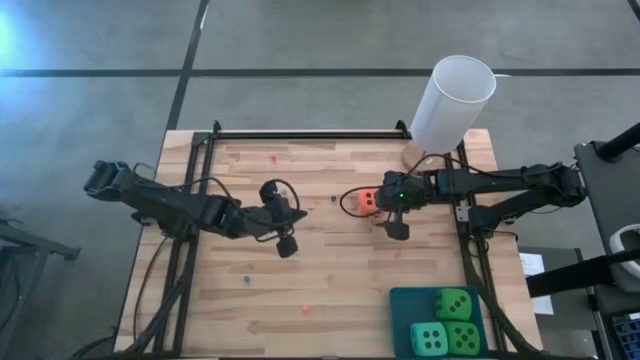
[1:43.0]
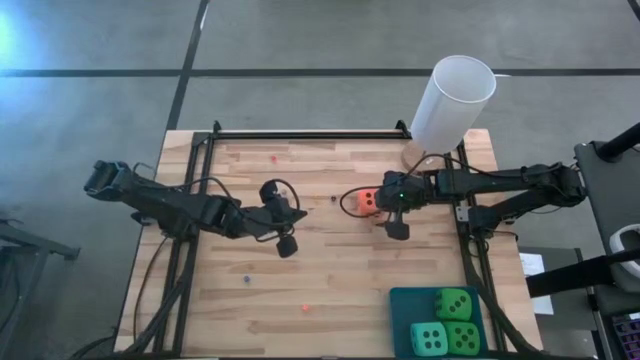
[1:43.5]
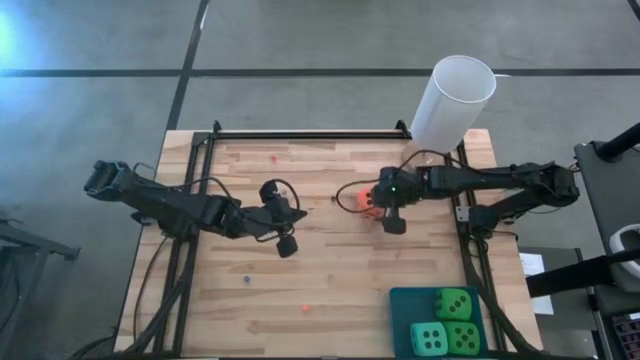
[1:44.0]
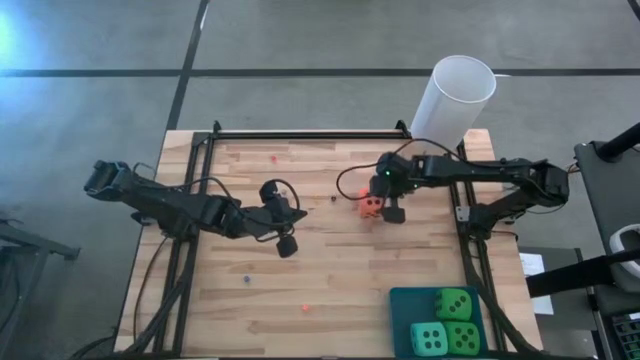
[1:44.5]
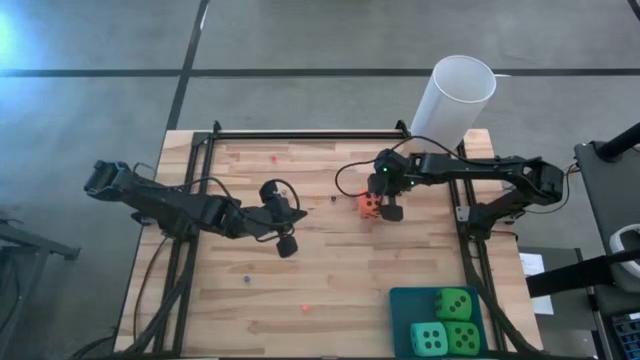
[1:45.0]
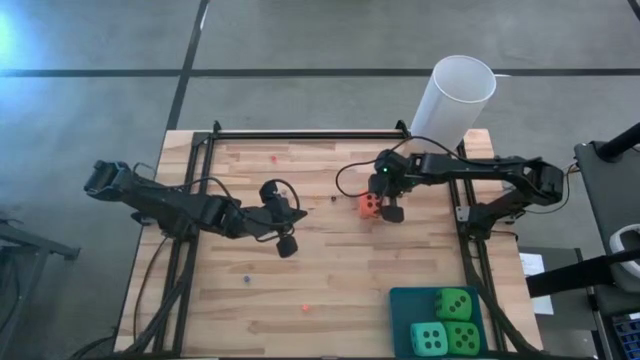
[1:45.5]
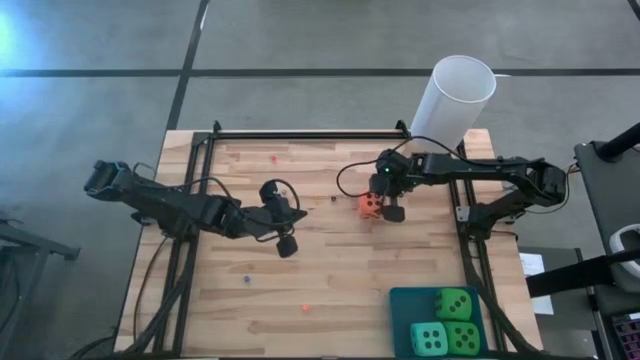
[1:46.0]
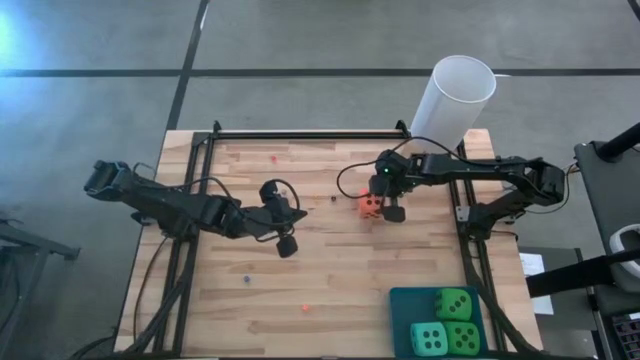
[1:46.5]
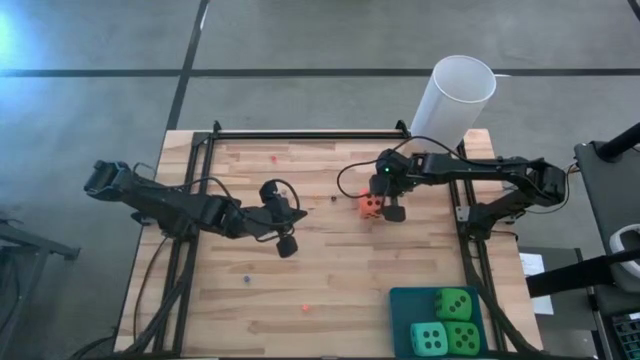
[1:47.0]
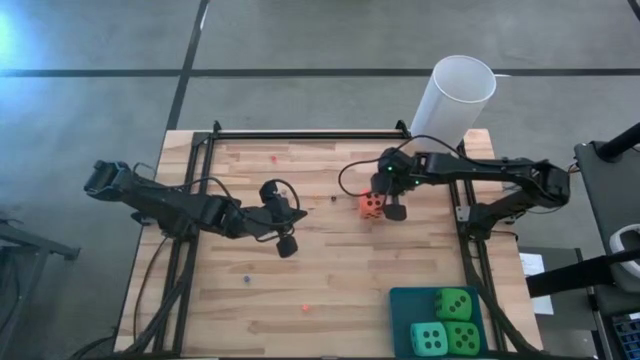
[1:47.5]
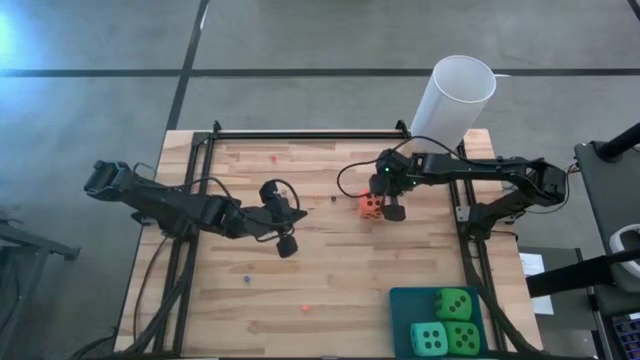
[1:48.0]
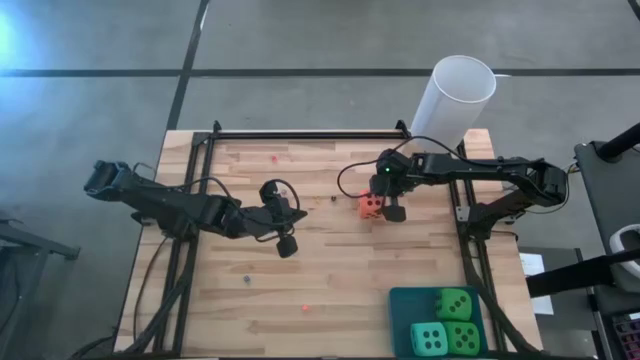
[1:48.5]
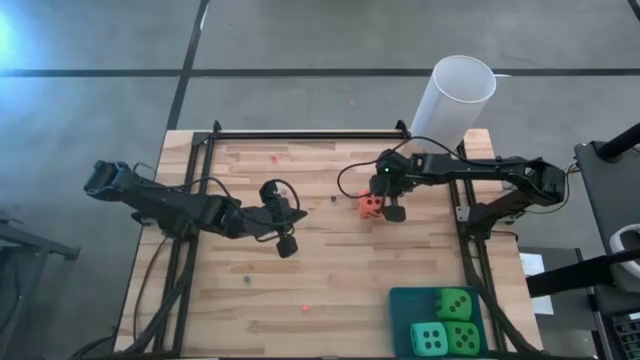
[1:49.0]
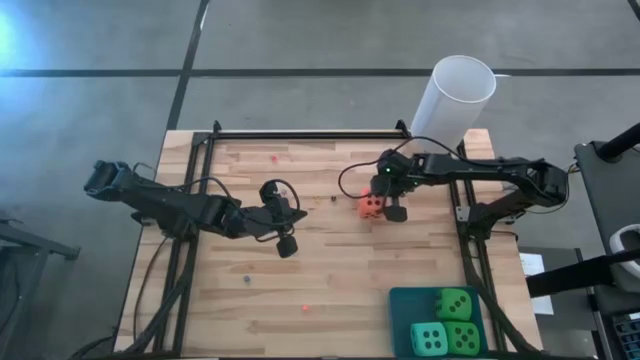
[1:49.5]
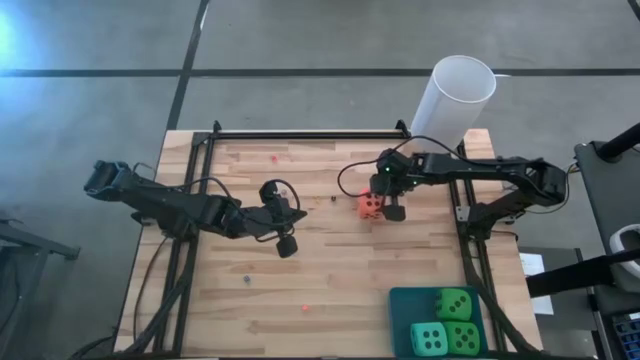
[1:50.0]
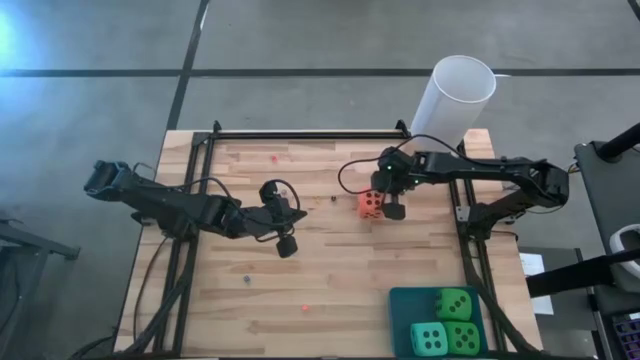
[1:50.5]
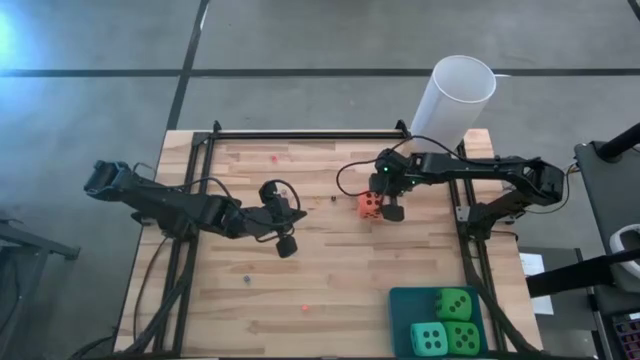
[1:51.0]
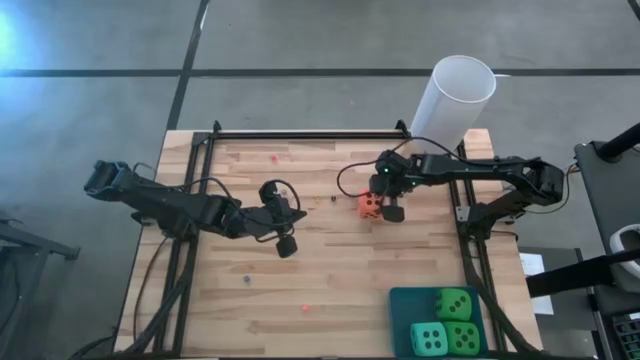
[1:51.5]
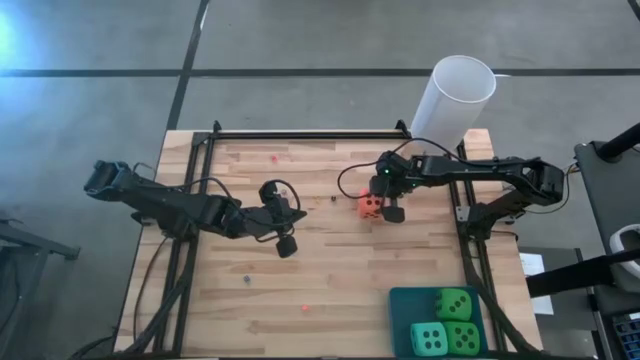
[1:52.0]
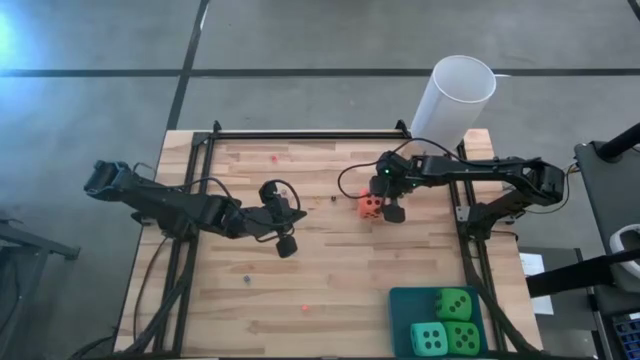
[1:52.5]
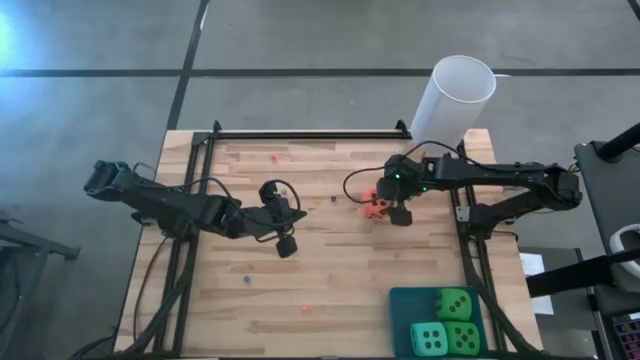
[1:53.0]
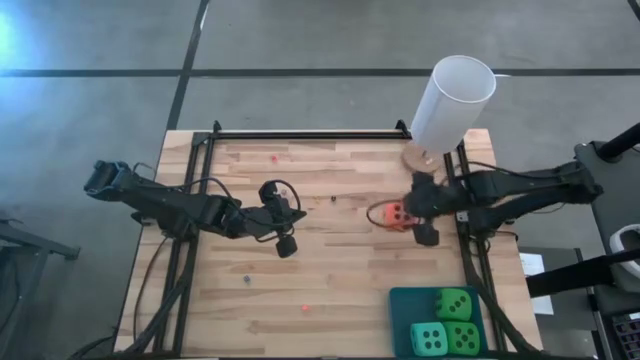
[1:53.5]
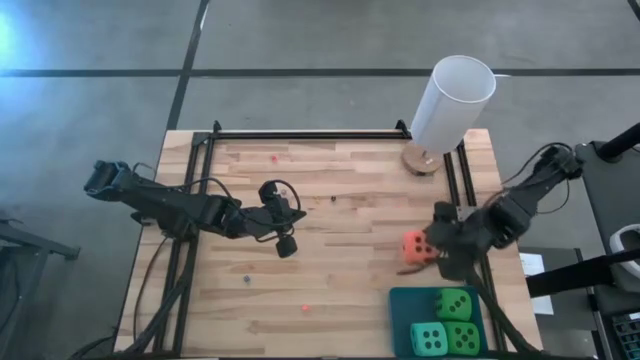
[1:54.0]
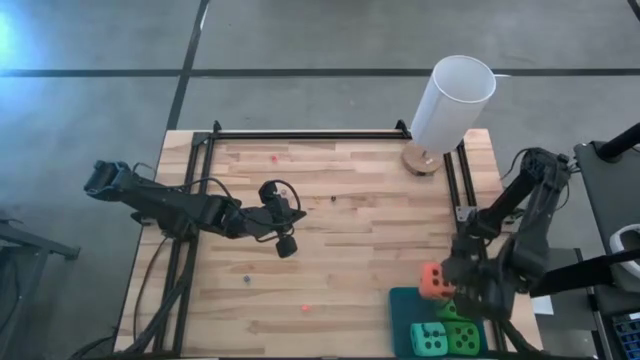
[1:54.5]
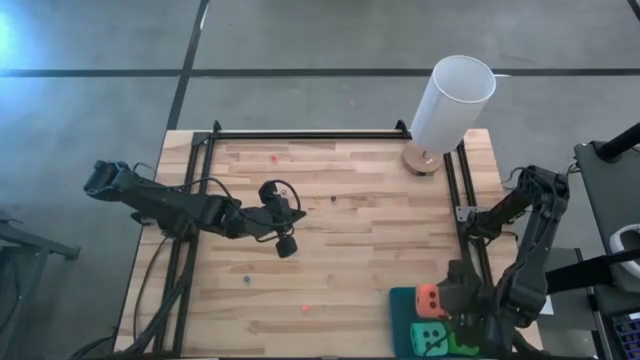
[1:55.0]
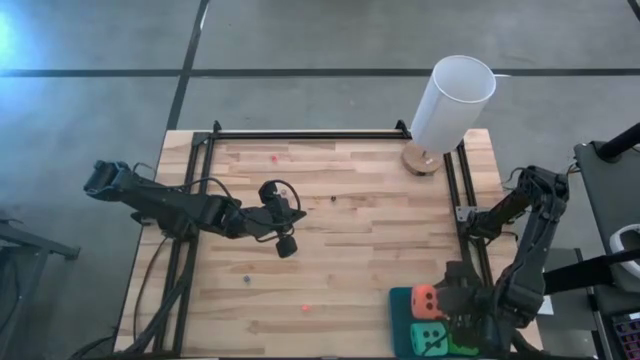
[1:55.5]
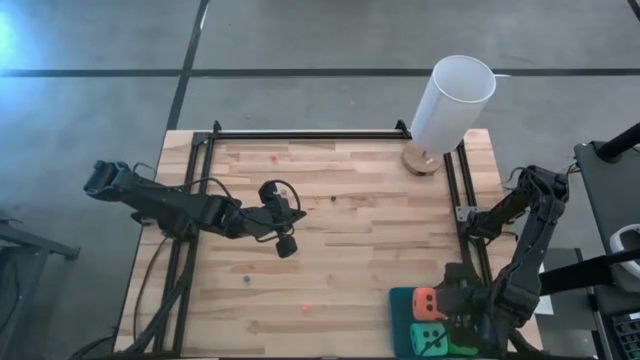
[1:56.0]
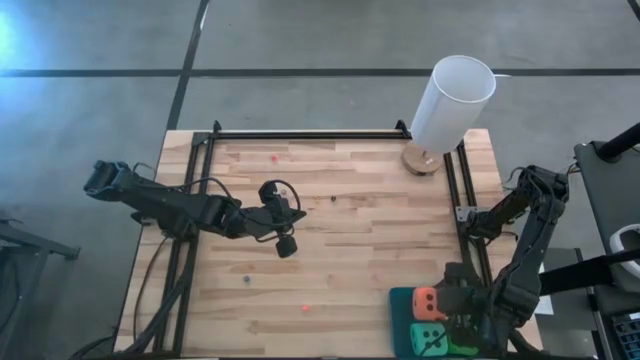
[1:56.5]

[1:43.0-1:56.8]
Task: Pick & Place Dice
Put the large orange die into the blue bin

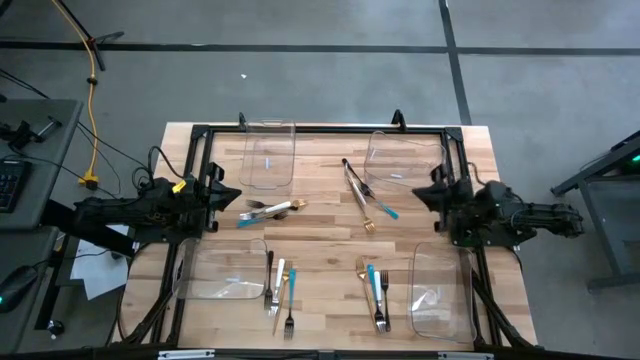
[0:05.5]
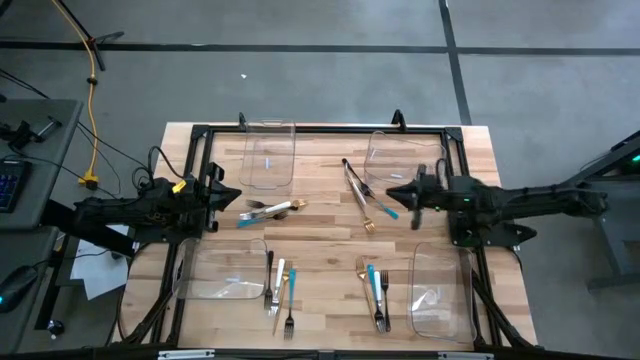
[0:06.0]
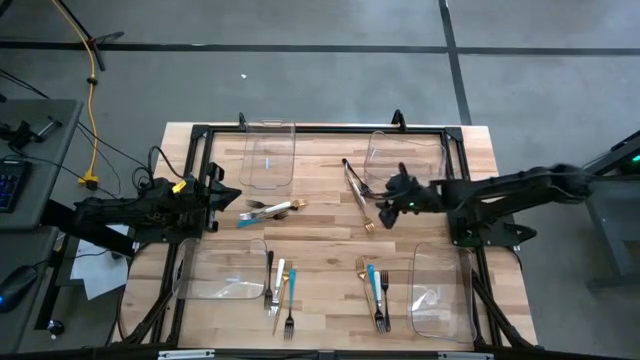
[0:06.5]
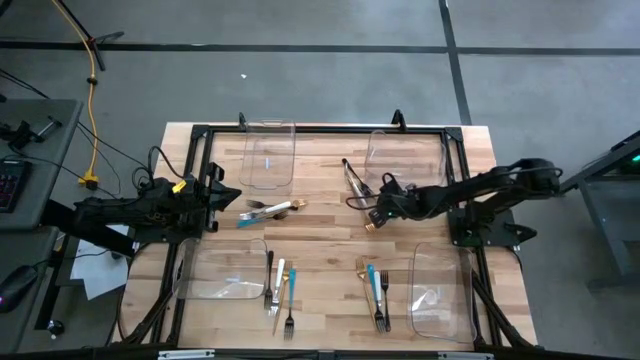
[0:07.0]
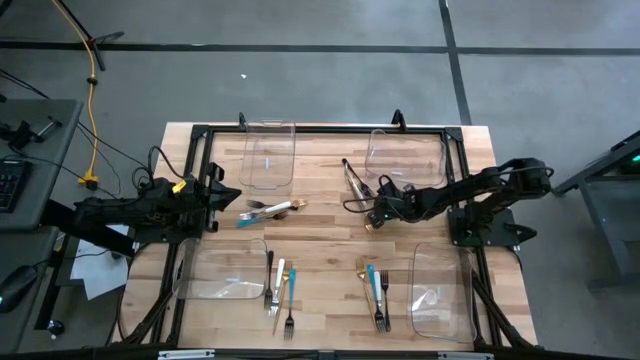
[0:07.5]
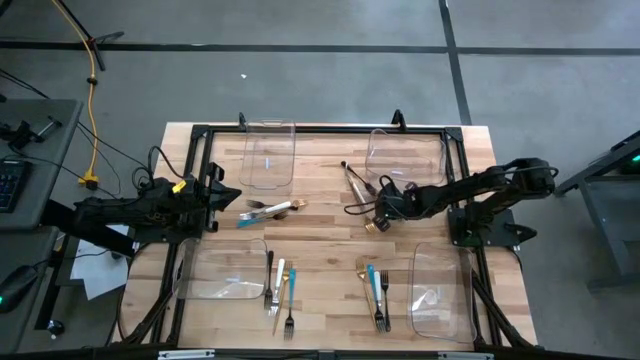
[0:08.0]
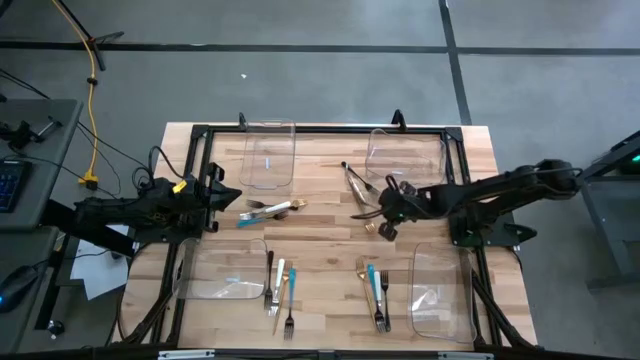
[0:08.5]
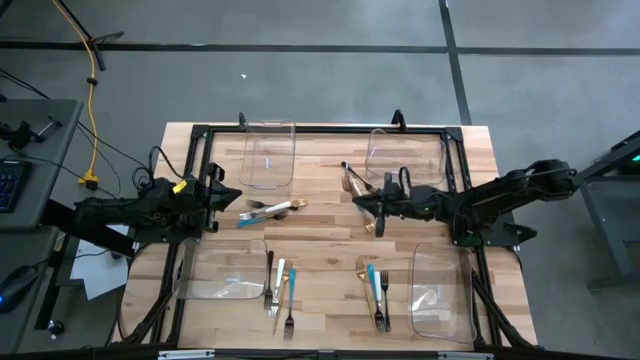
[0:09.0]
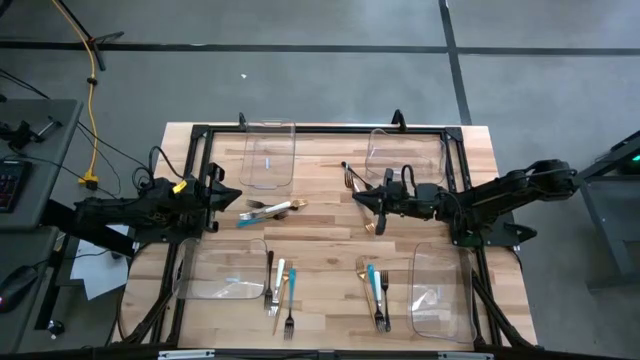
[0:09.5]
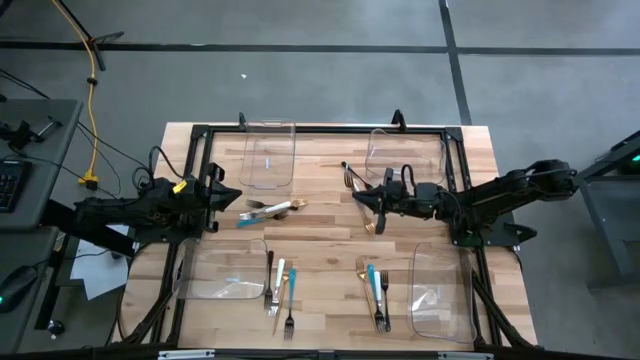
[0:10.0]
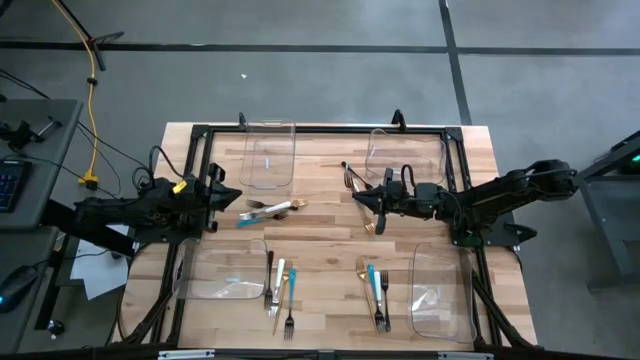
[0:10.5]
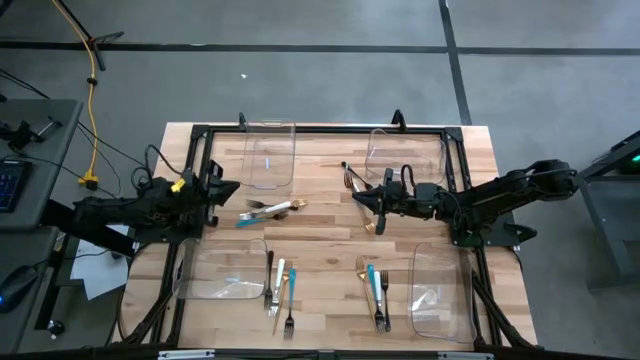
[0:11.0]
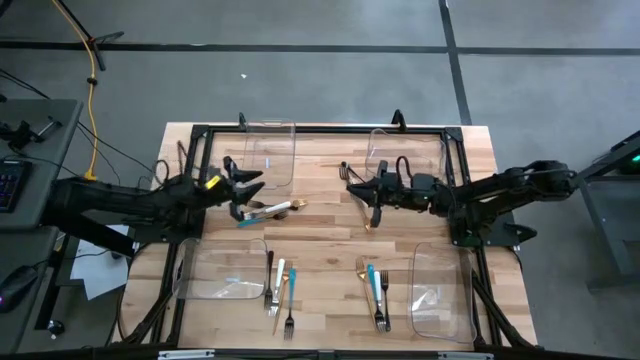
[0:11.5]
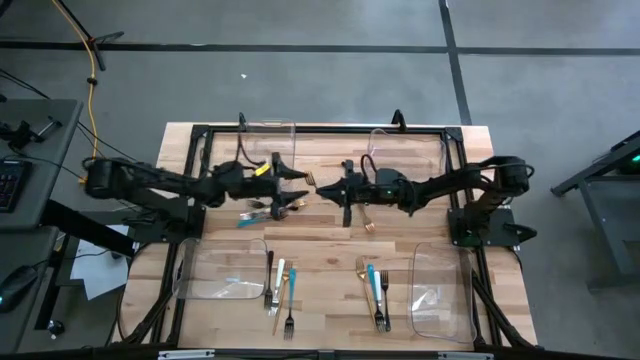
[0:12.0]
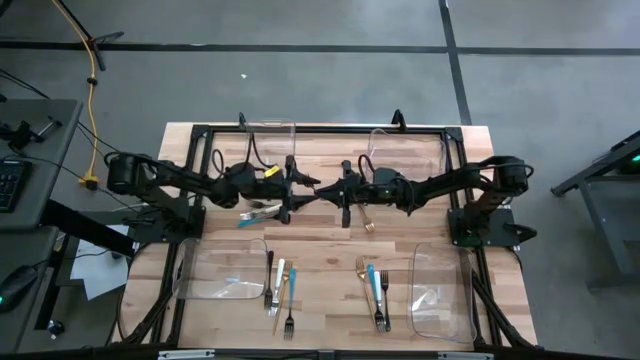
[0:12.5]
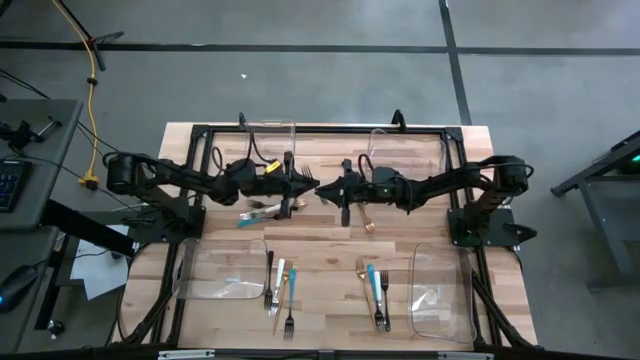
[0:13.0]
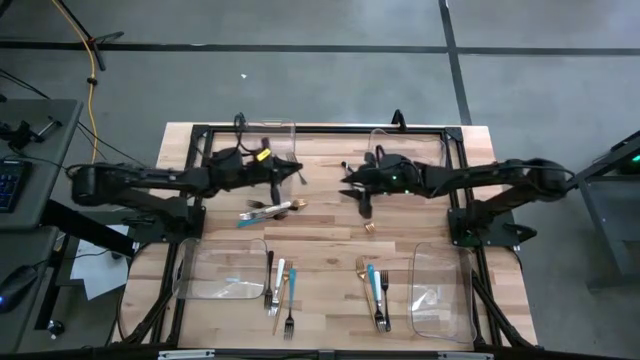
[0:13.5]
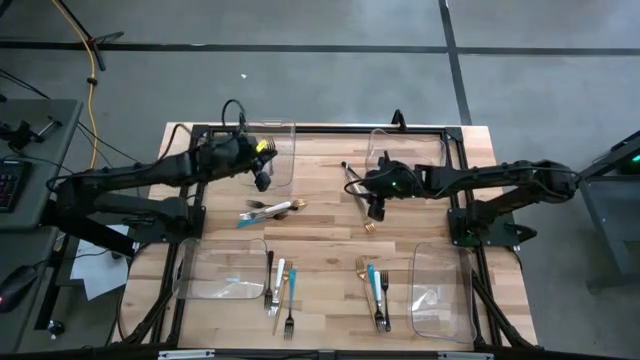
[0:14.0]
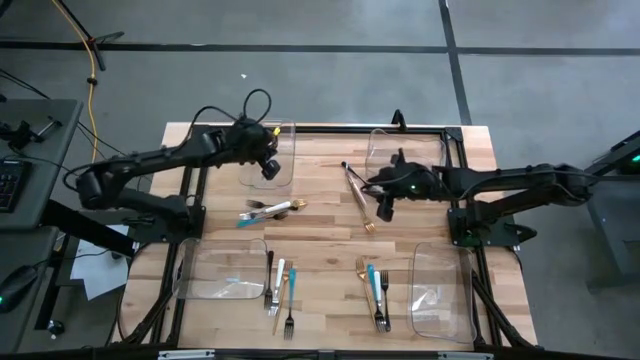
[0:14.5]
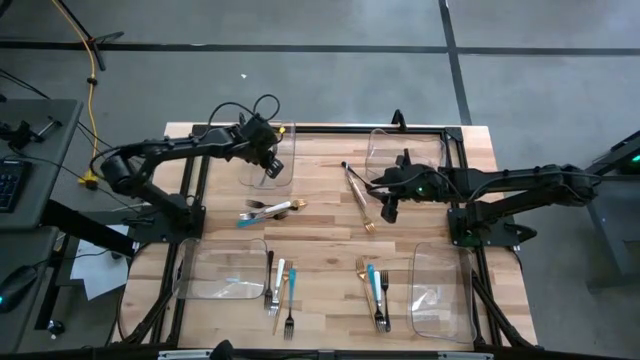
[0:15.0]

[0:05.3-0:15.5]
Task: Sort silverware by color (type)
Put the blue fork into the top left transparent bin
